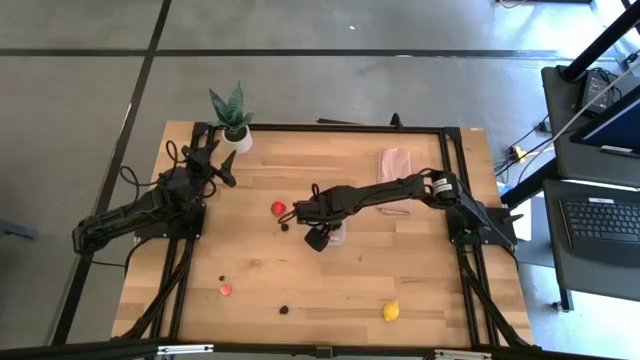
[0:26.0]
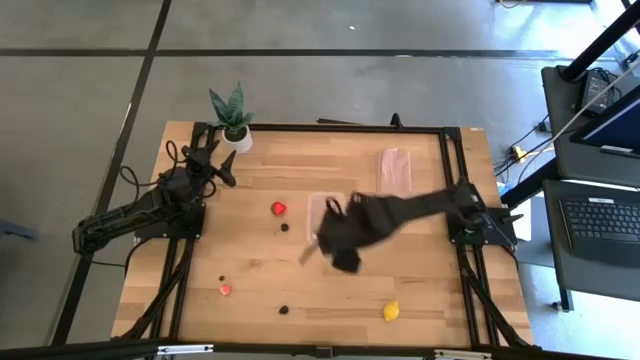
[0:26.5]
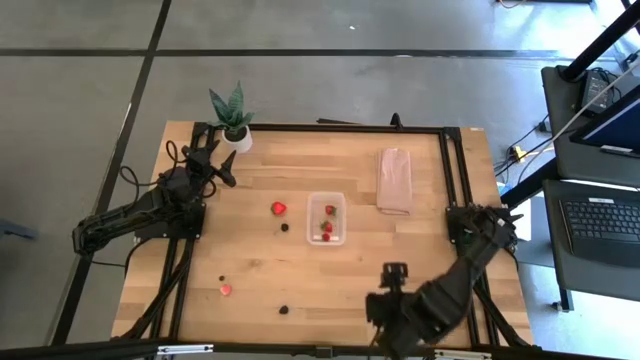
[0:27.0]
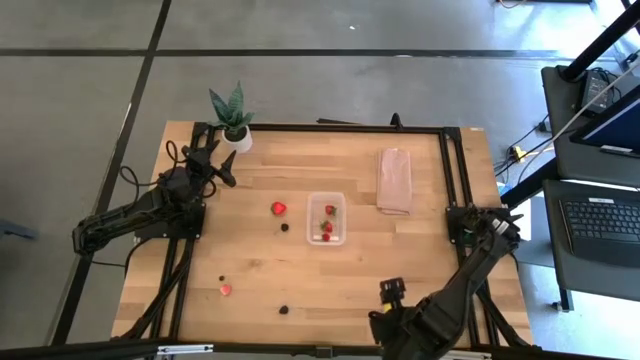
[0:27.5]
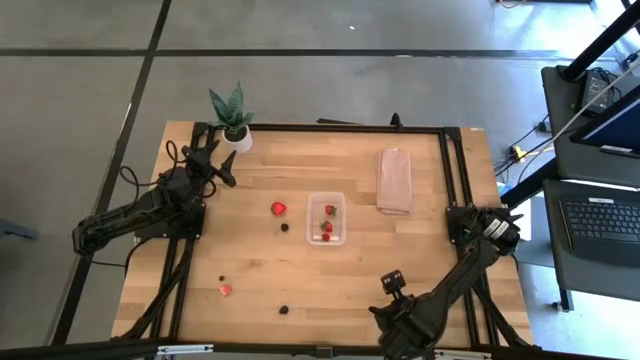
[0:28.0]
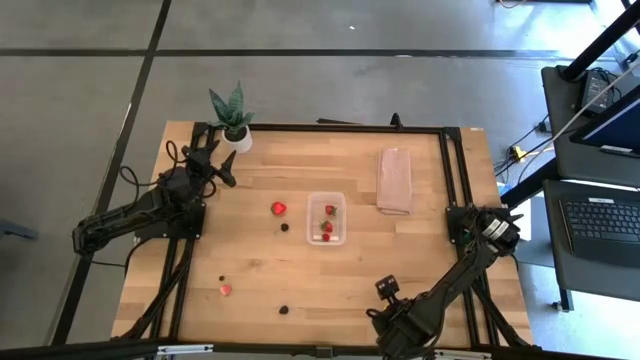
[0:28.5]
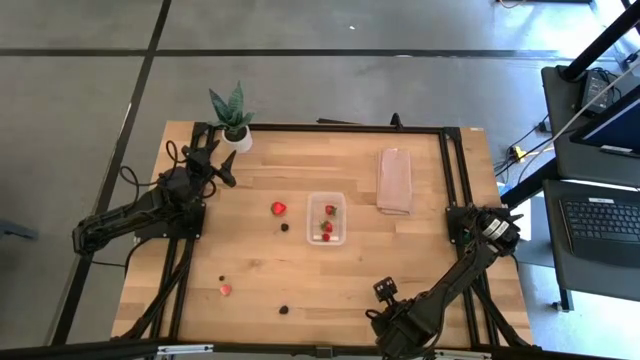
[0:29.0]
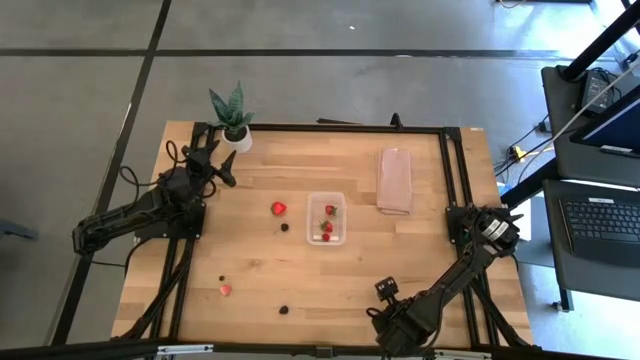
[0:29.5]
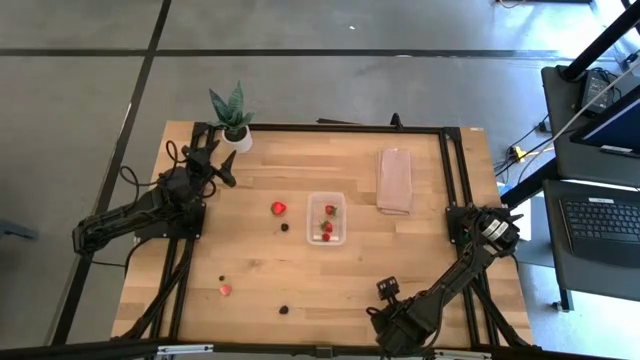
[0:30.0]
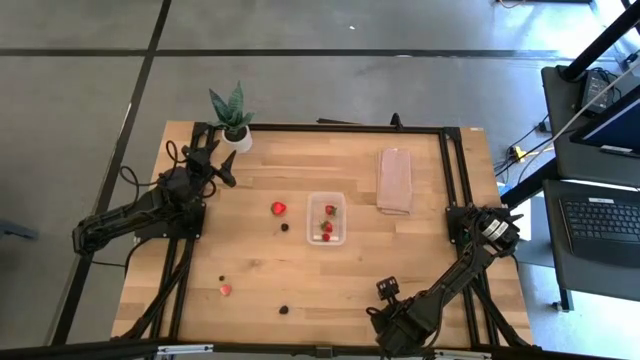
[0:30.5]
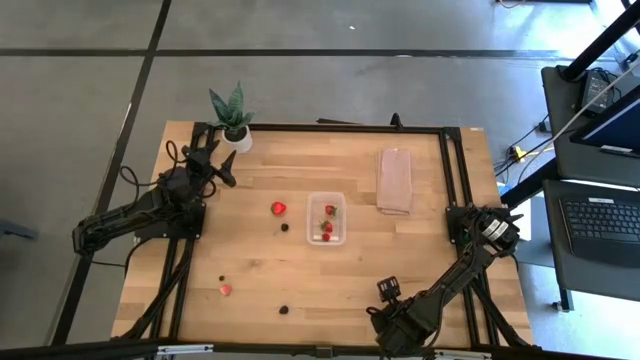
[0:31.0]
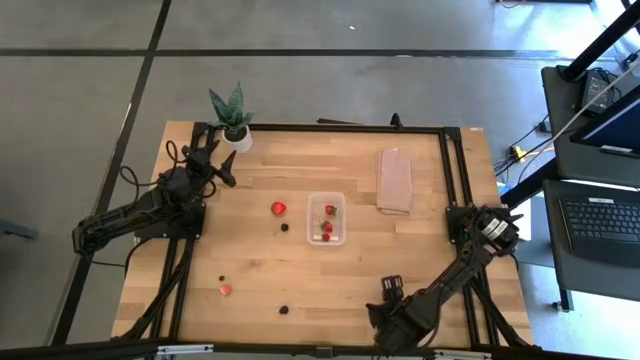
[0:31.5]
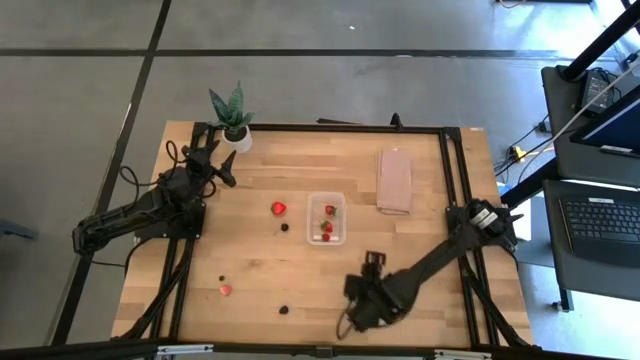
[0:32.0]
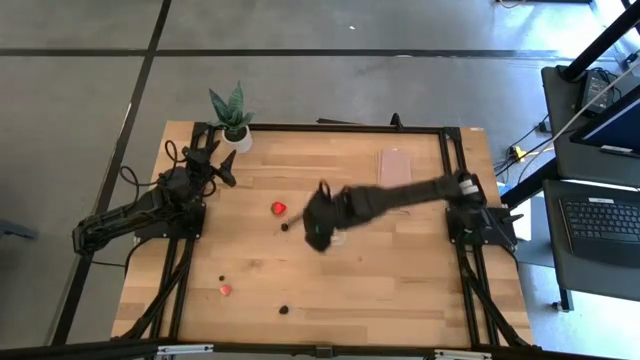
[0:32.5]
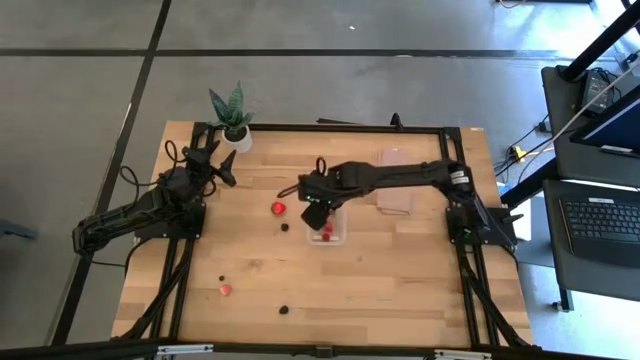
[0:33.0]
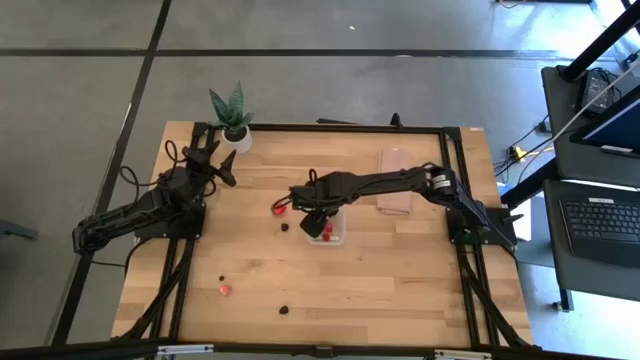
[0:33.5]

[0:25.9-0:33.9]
Task: Pick and placing Produce into tupperware
Put the yellow lemon into the transparent bin

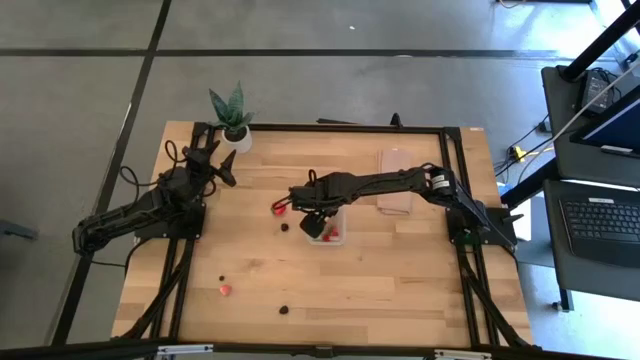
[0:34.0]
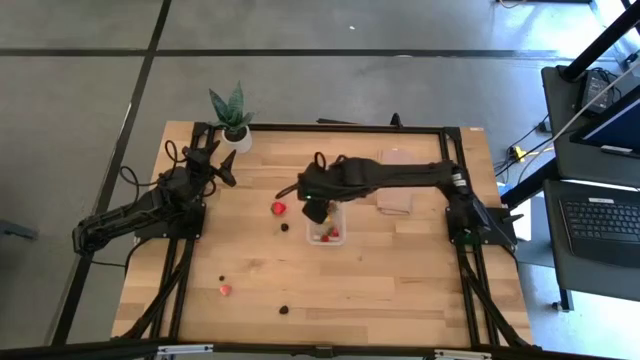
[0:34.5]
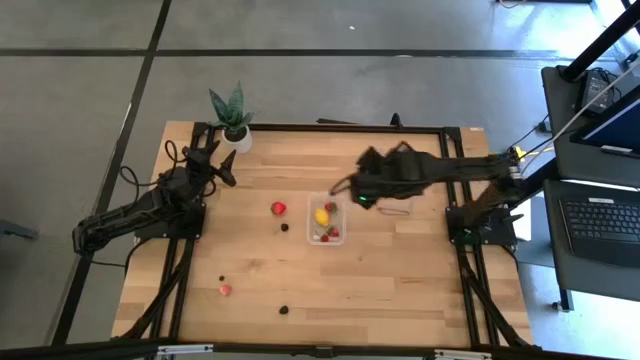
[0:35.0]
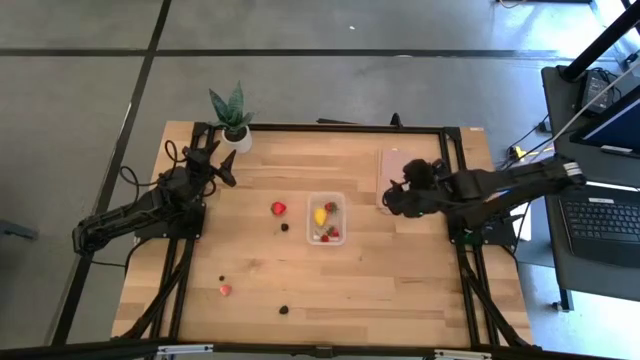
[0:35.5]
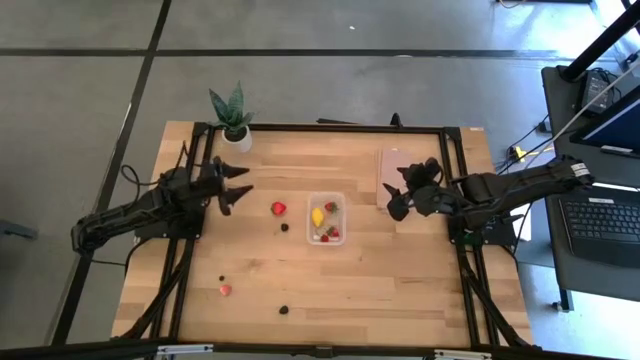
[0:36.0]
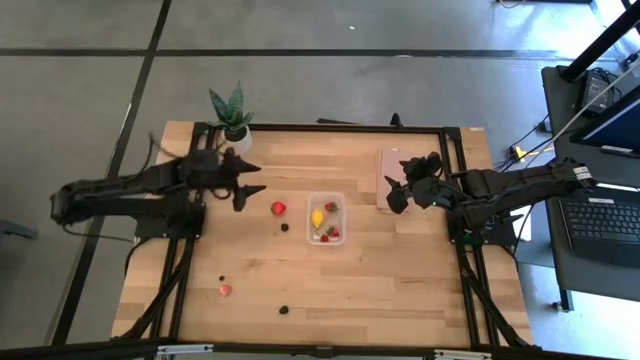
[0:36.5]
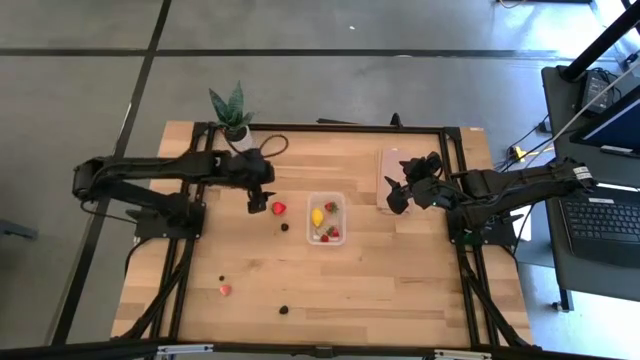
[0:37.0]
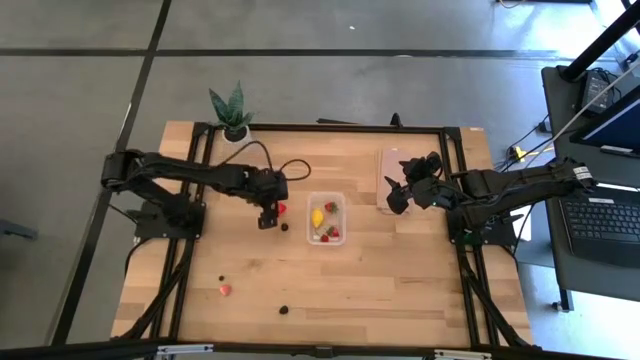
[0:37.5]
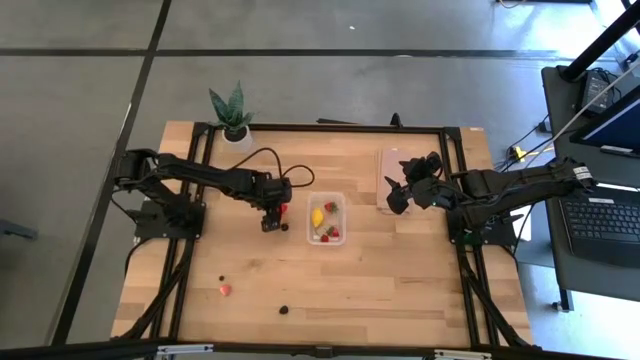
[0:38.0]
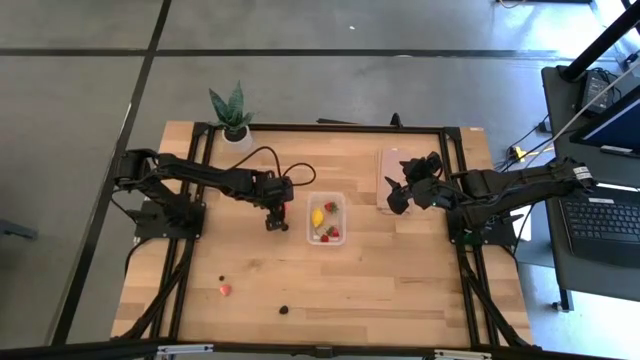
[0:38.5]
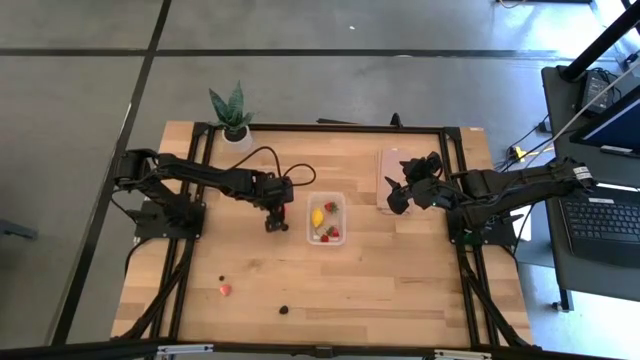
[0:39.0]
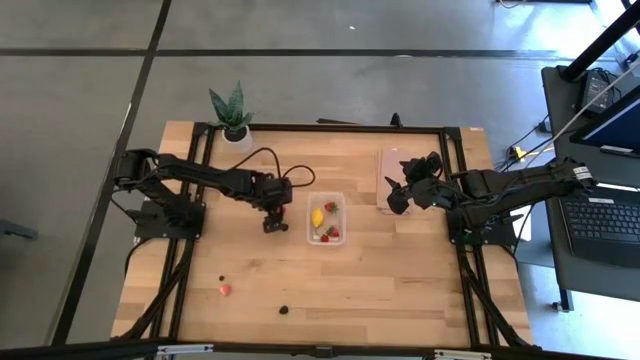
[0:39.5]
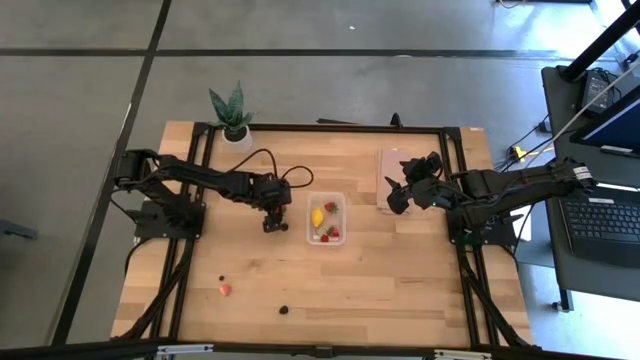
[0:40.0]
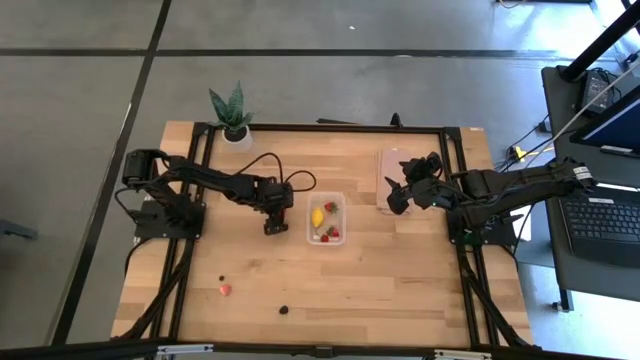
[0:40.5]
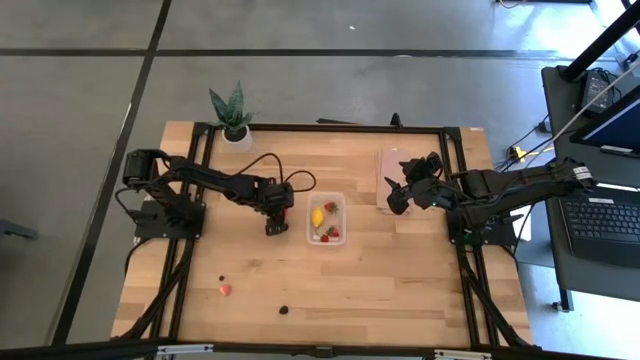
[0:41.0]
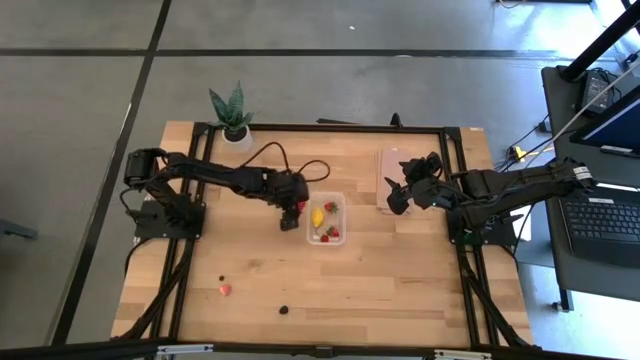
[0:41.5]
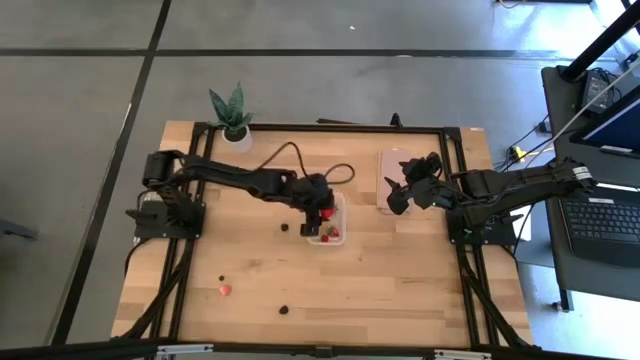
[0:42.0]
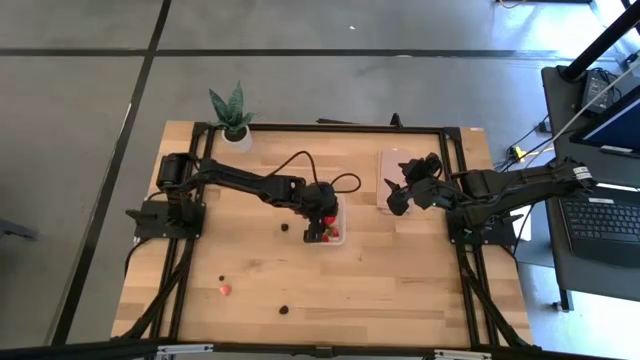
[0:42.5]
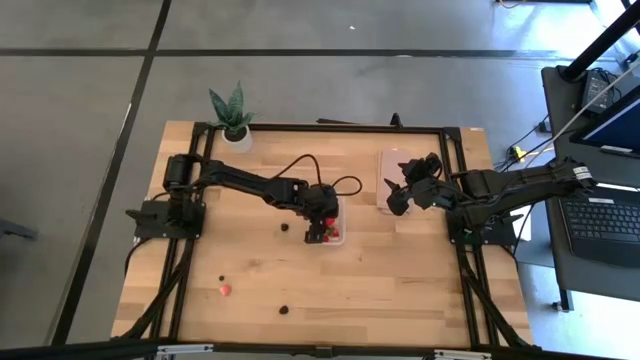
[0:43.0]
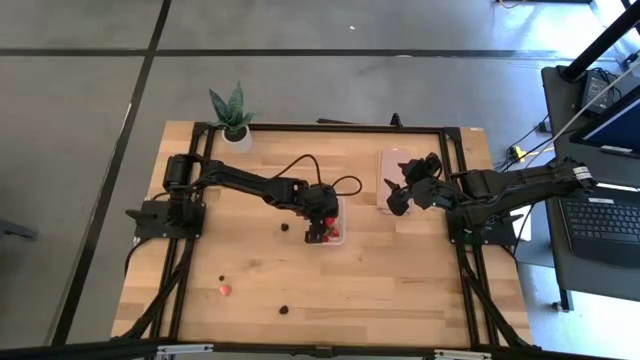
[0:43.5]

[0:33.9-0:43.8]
Put the red strawberry into the transparent bin

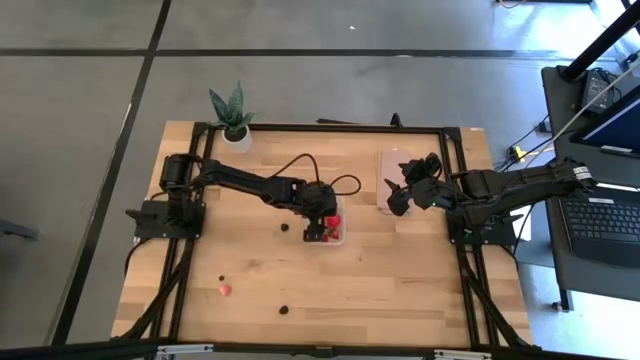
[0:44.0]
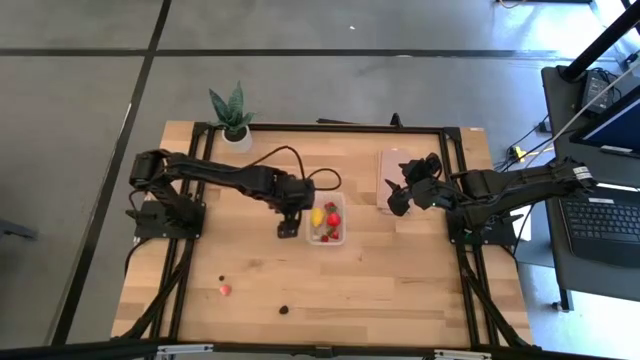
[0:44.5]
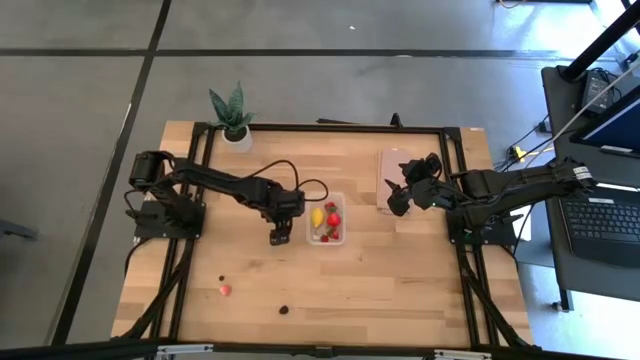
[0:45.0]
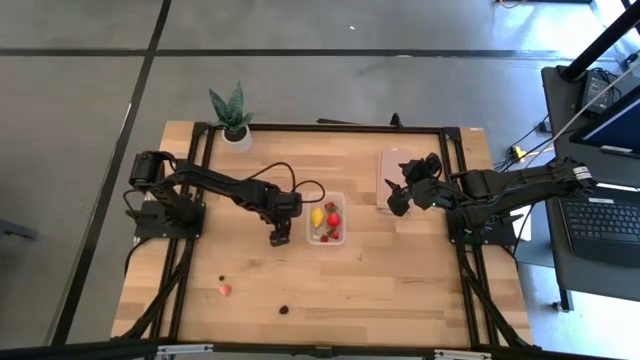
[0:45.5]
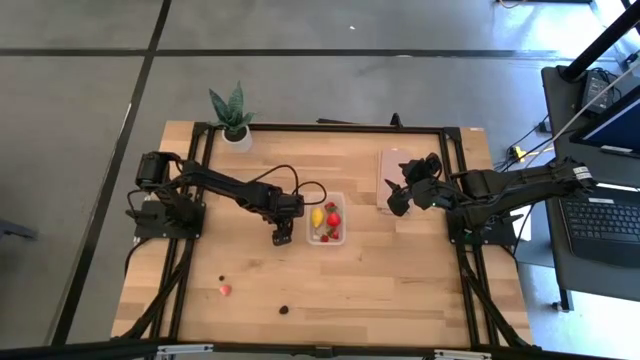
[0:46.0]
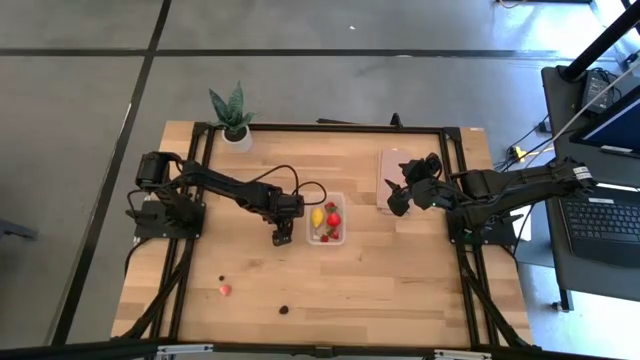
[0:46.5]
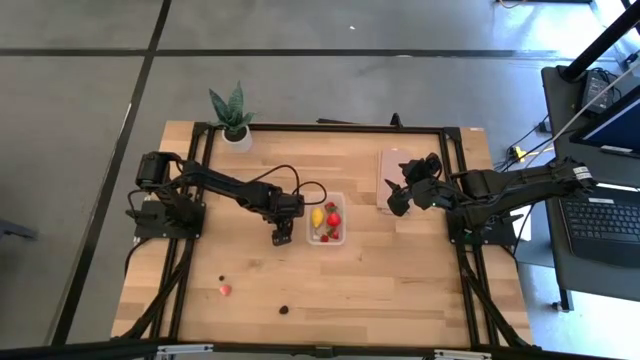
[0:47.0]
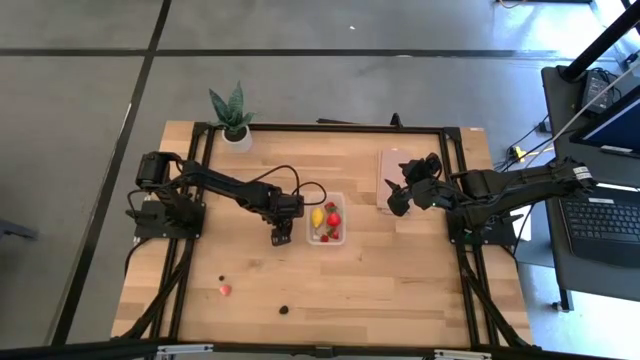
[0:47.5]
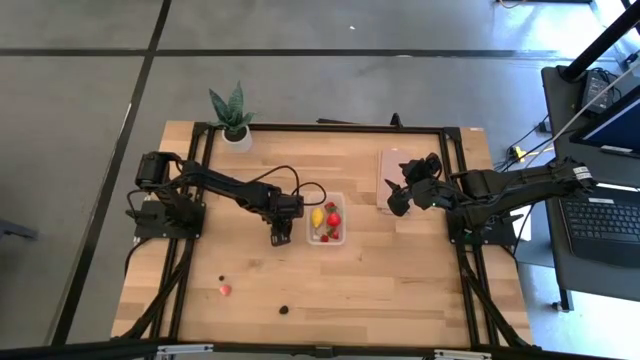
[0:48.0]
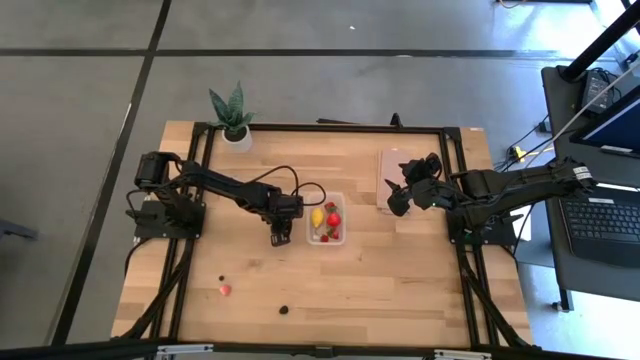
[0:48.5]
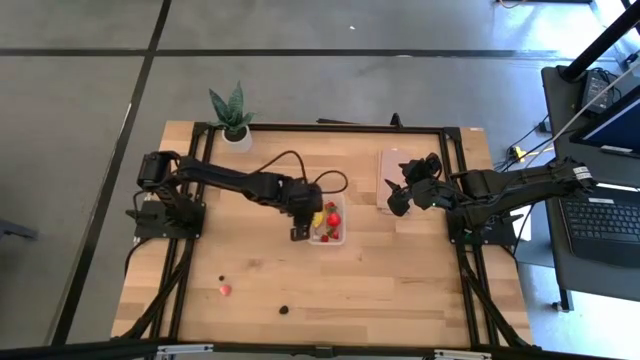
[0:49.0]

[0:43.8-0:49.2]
Put the black cherry into the transparent bin
